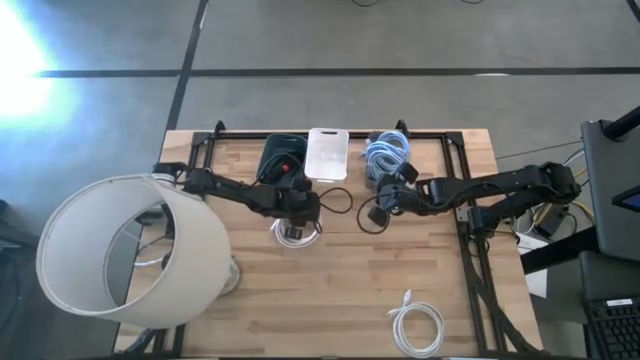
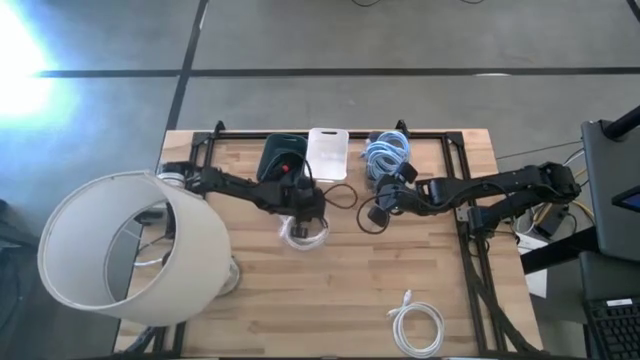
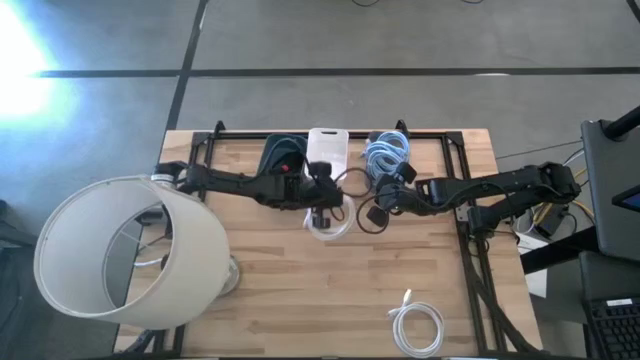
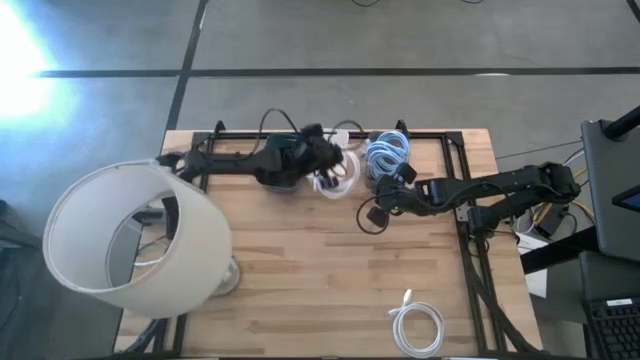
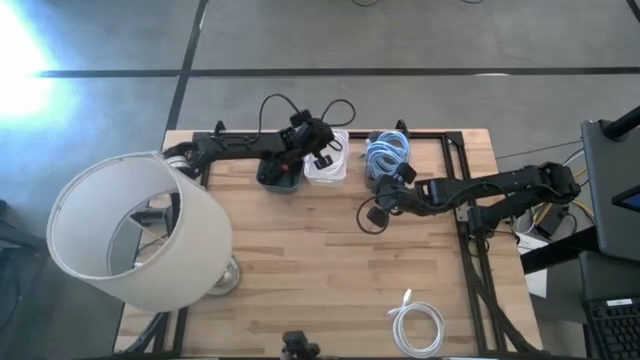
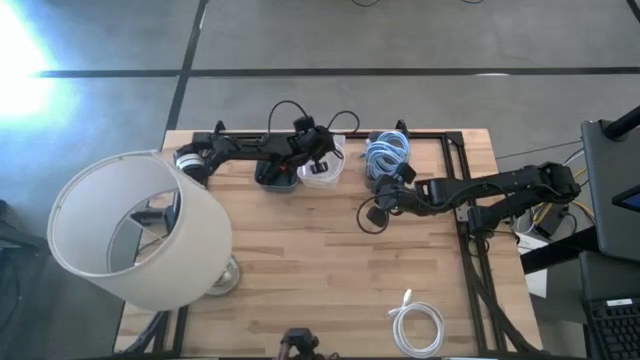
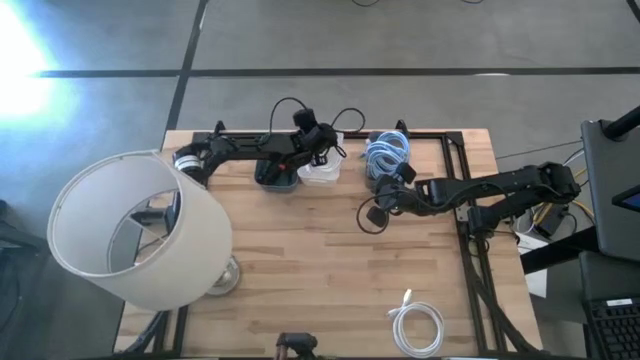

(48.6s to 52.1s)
Task: Pick & Place USB Port
Put the top white HDMI cable into the white bin

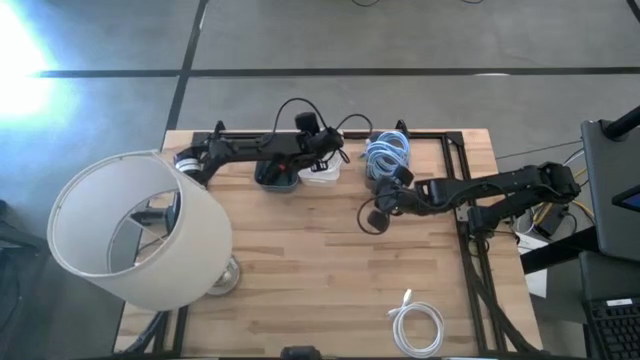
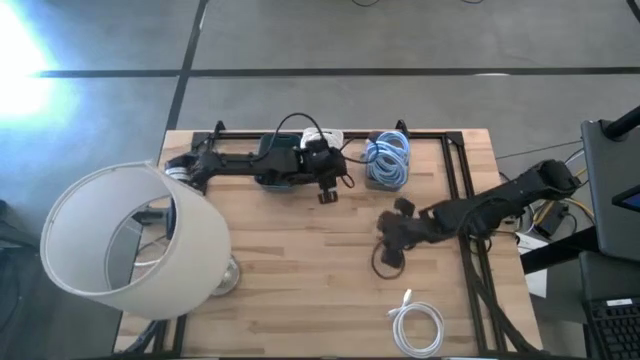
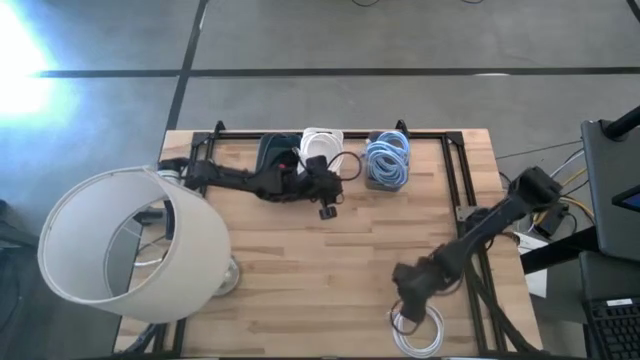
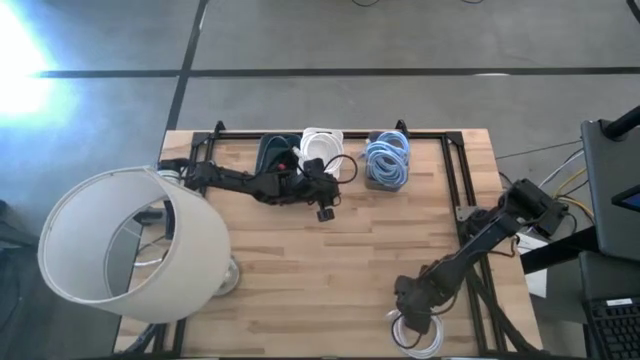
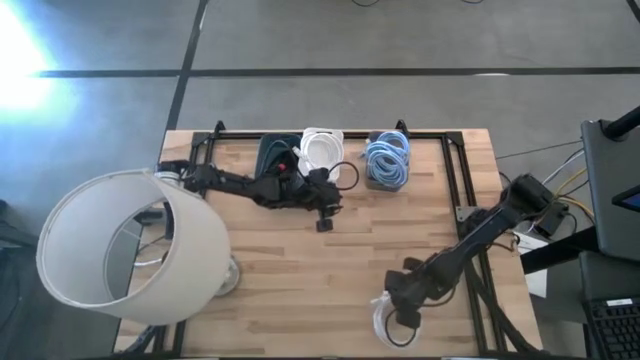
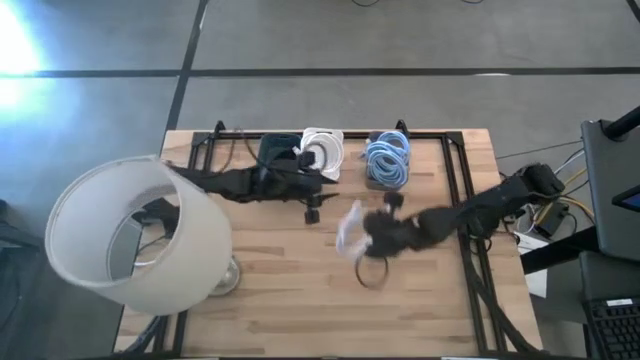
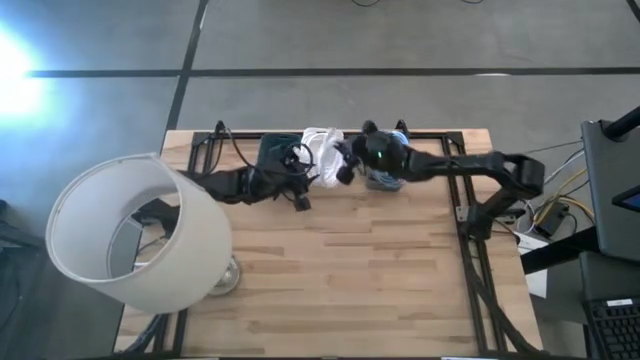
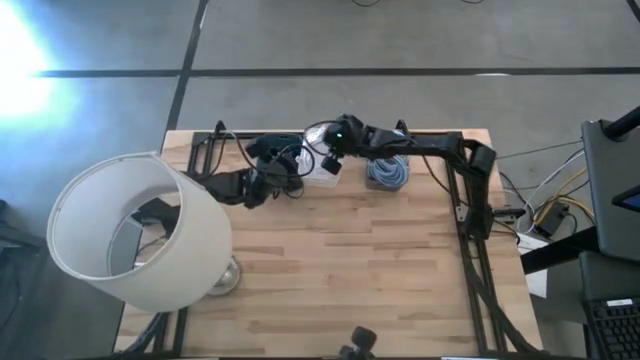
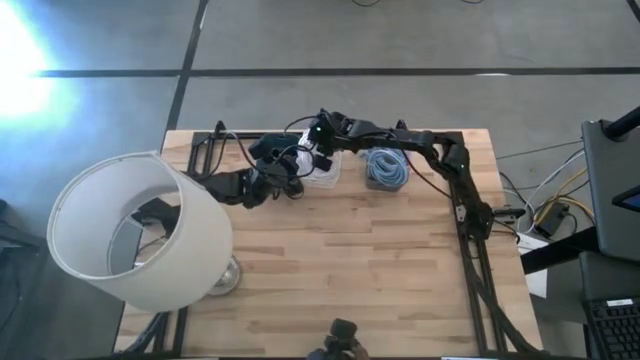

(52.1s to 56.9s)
Put the white HDMI cable into the white bin

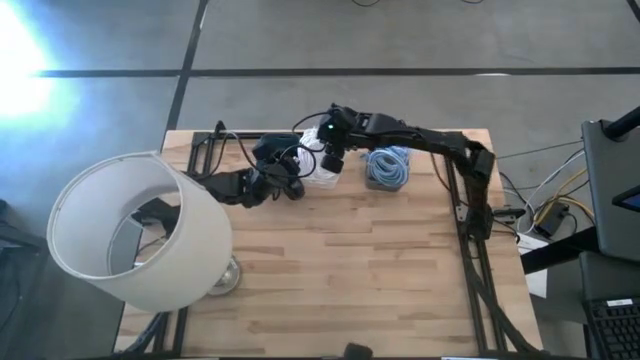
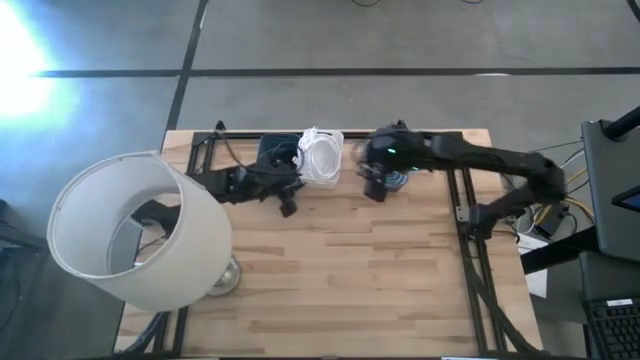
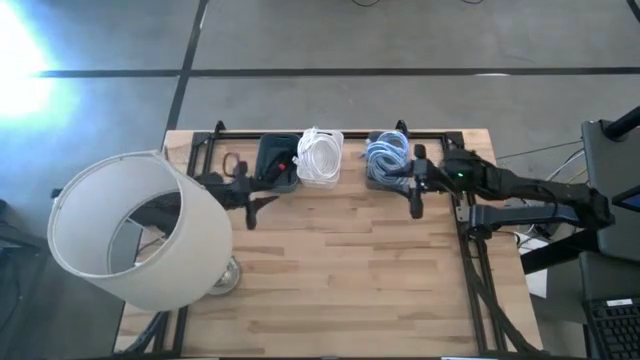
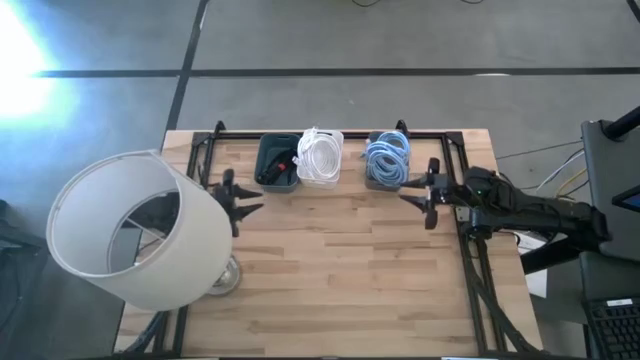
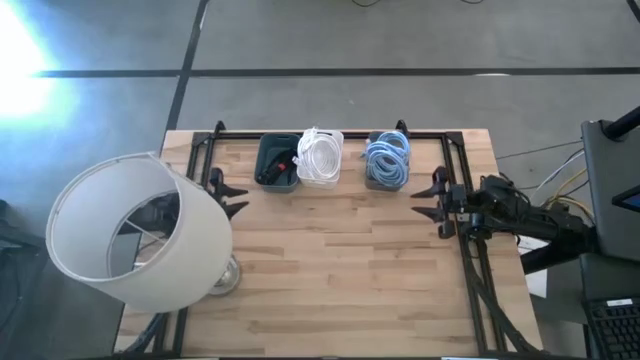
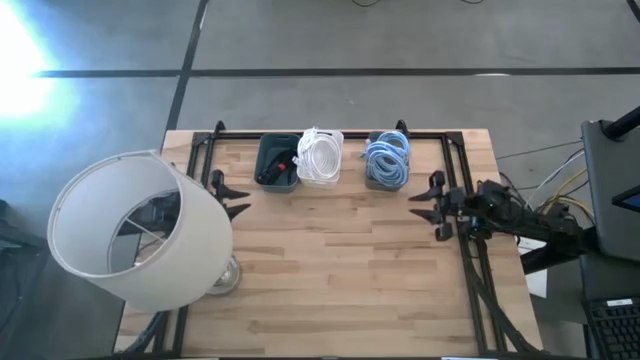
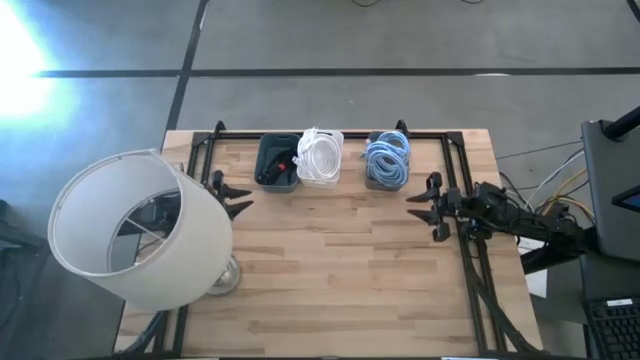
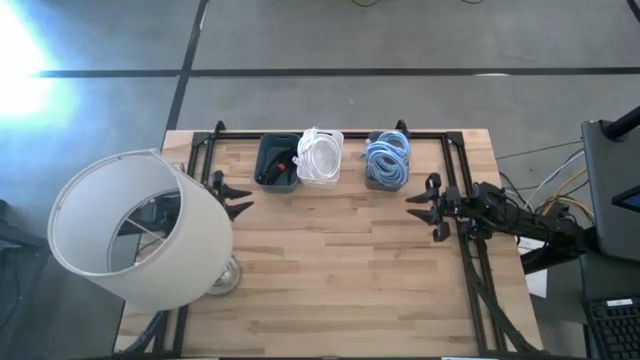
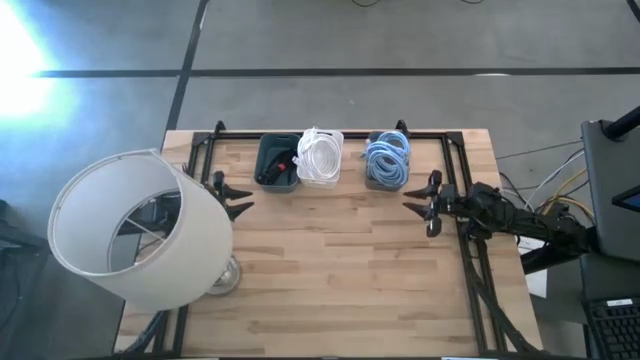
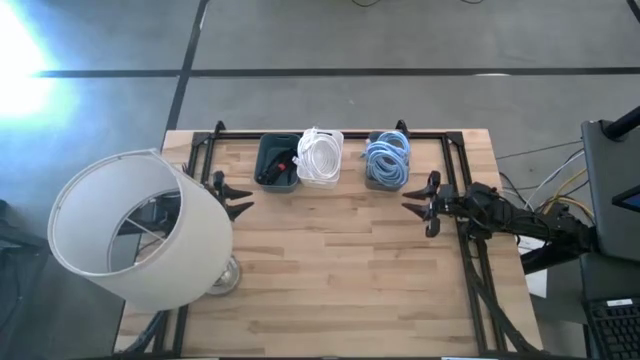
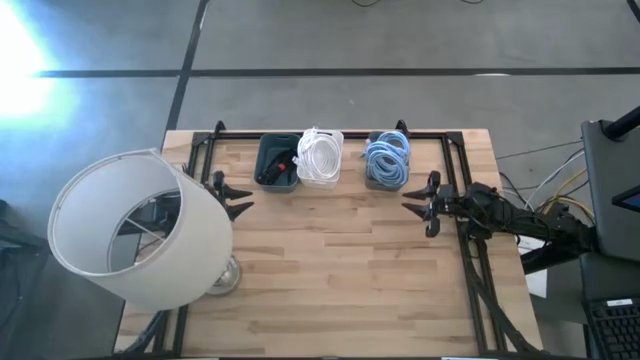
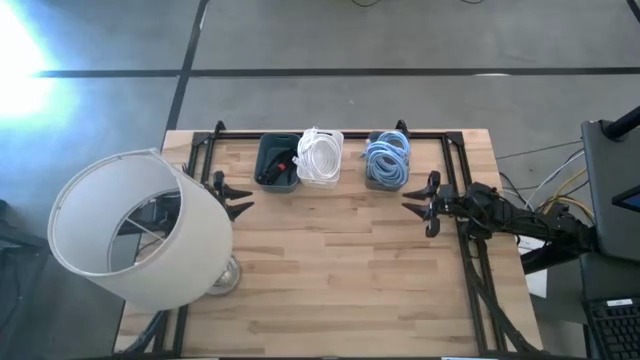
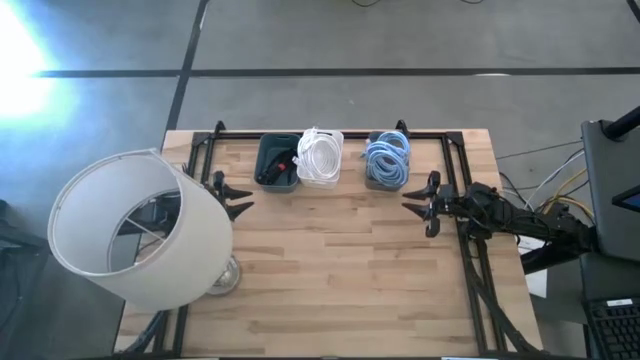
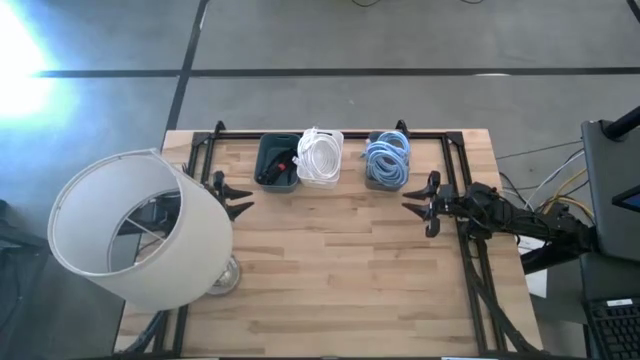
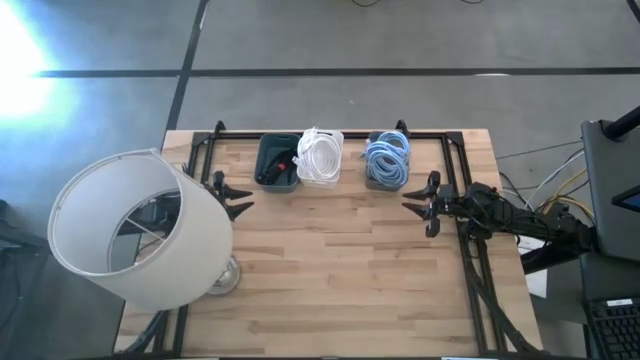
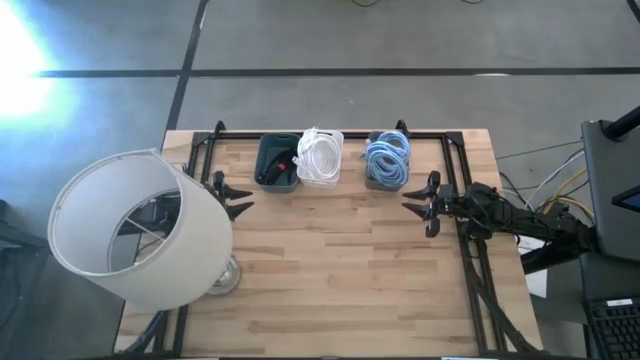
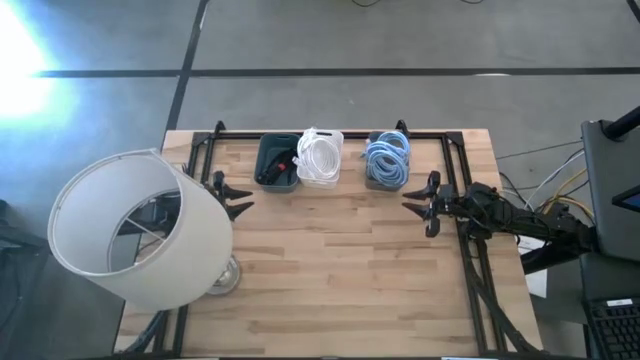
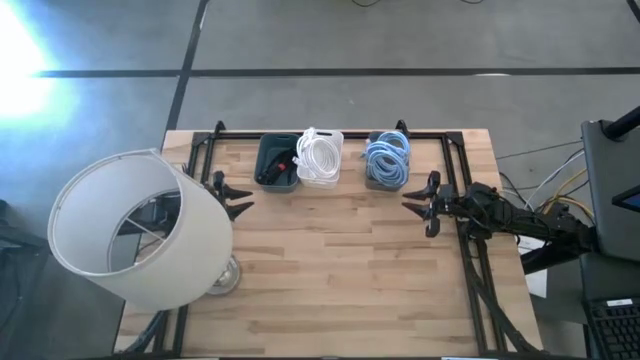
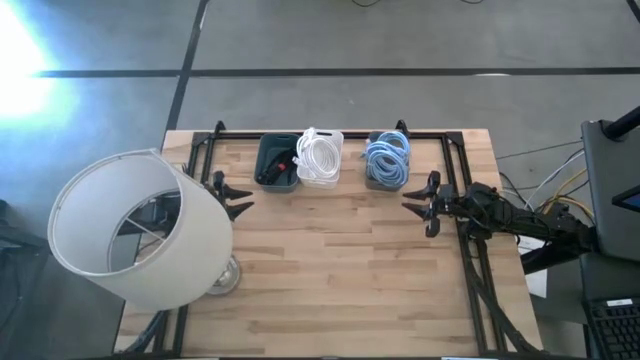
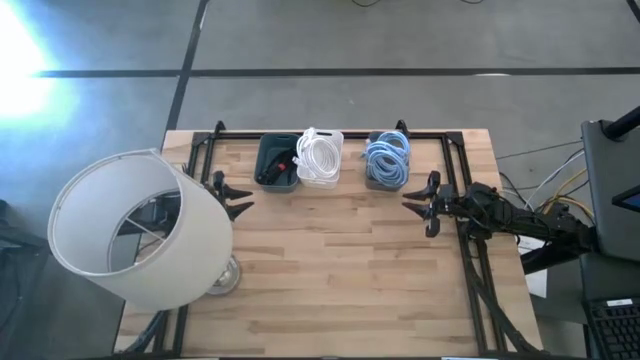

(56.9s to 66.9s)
Return to Home Position

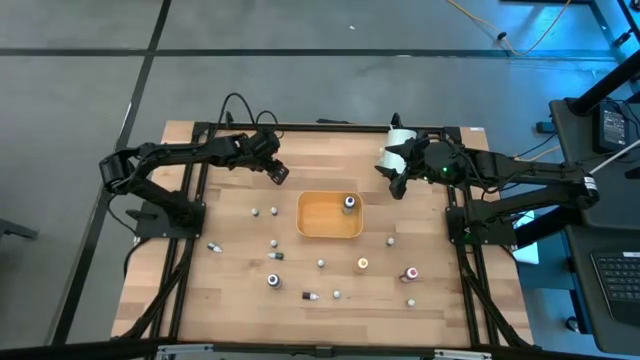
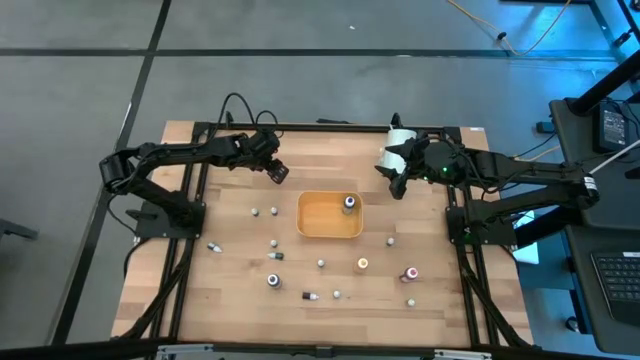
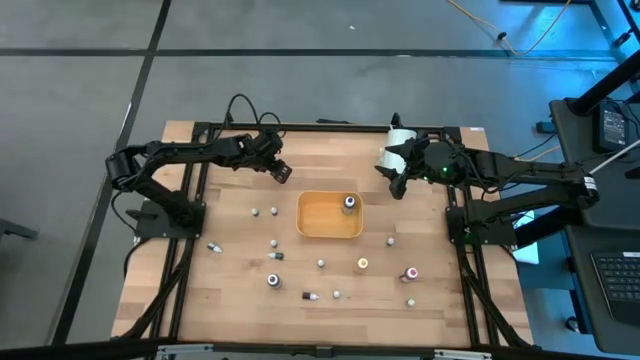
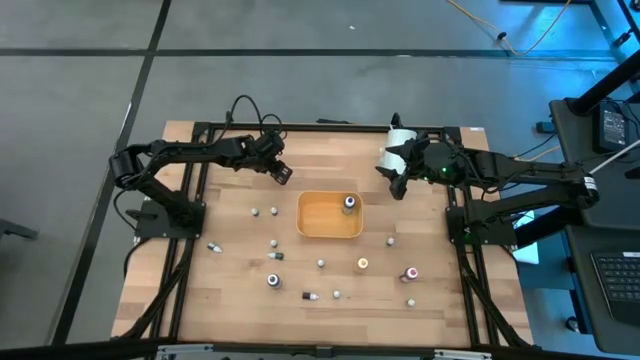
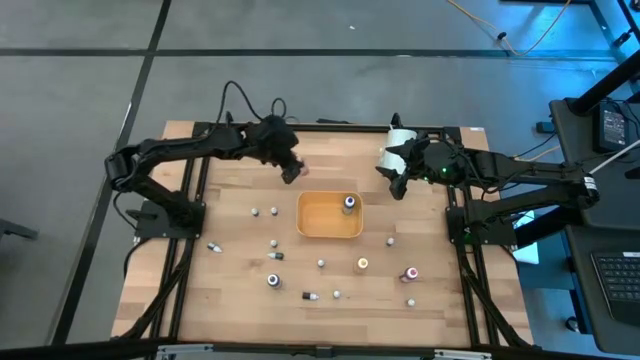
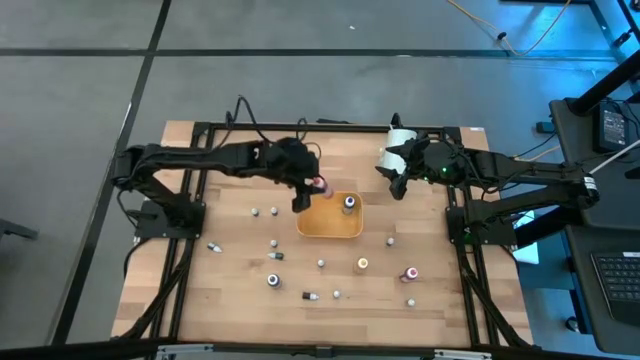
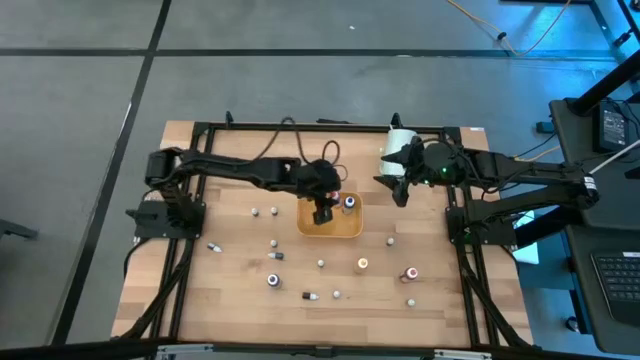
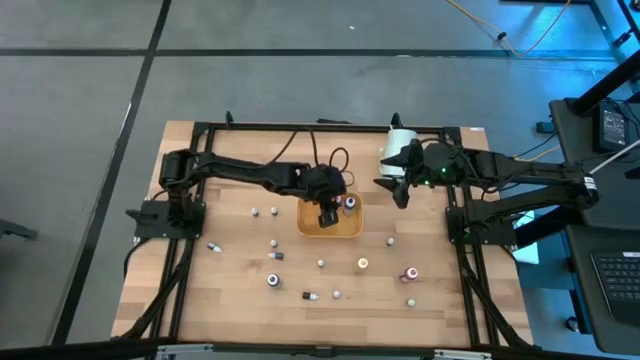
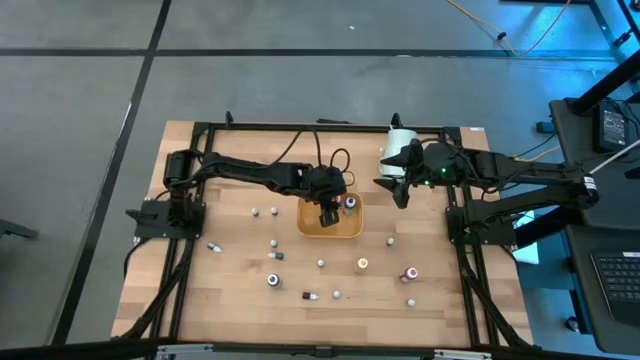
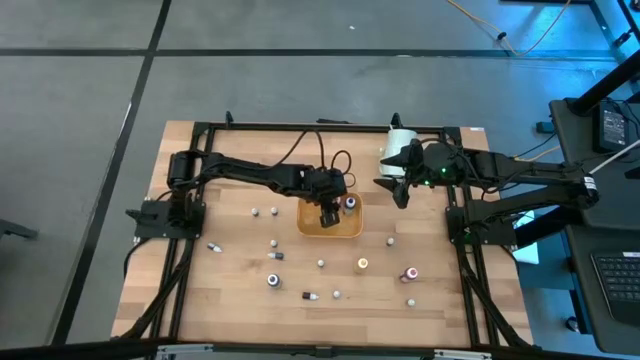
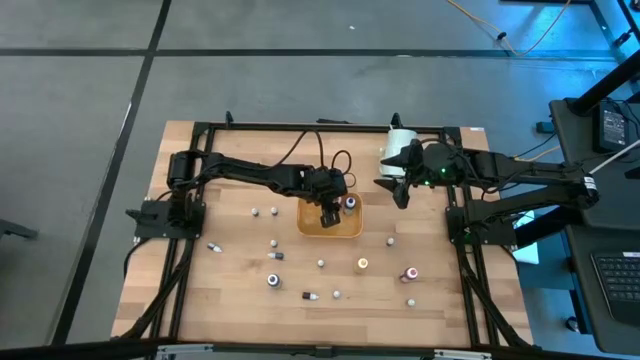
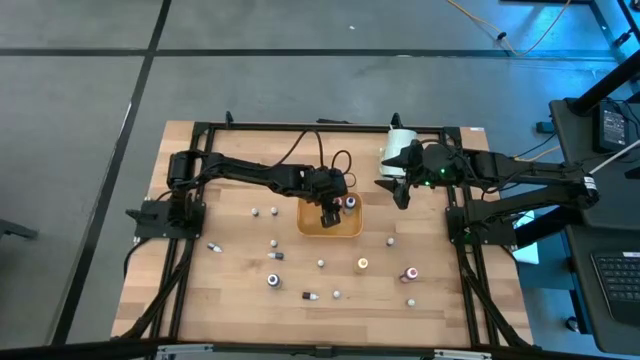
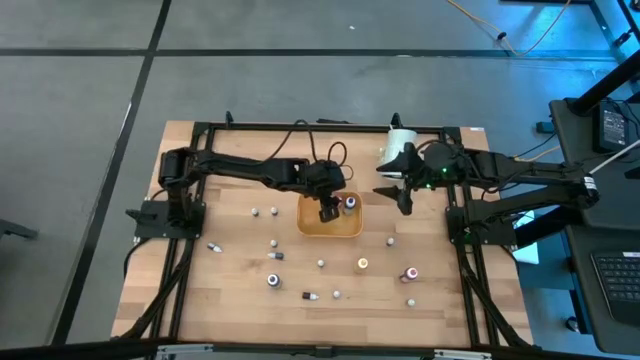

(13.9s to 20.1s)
Task: Pick & Place food coloring
Put the large orange food coloring bottle into the yellow bin
